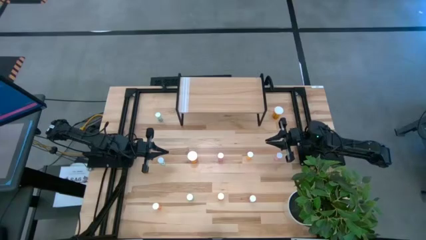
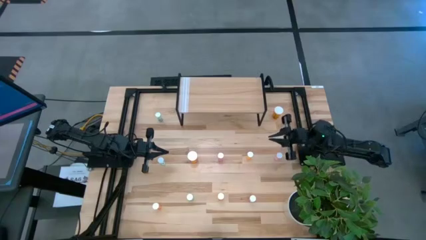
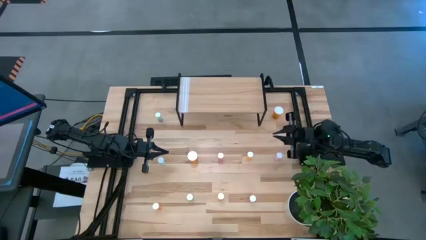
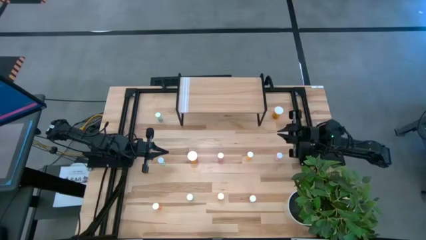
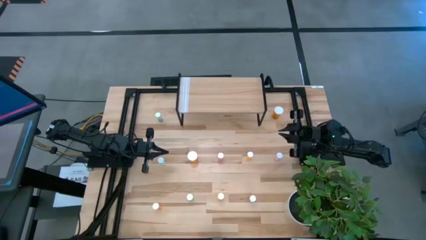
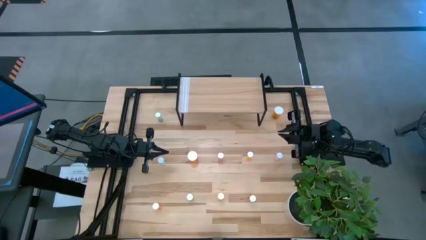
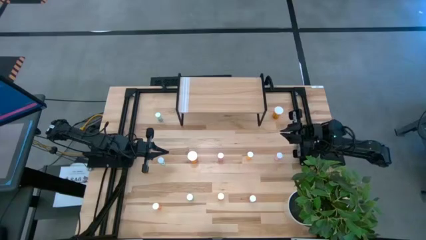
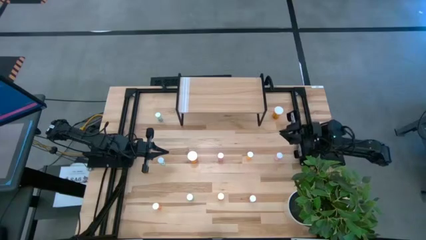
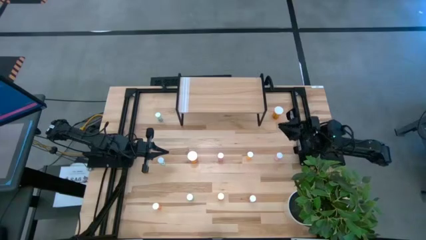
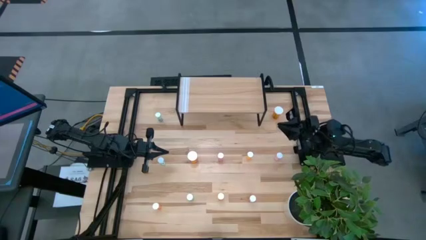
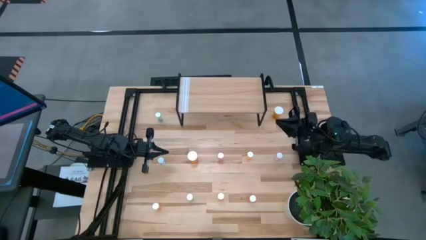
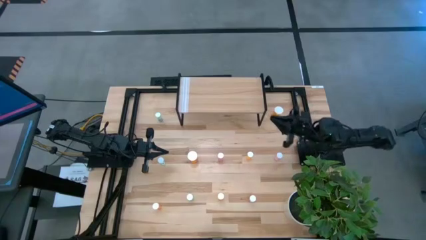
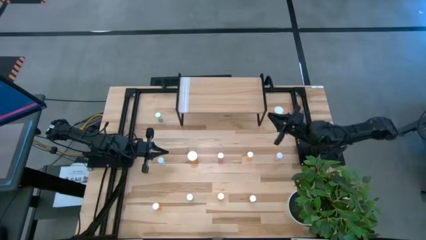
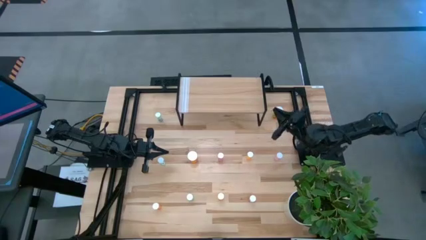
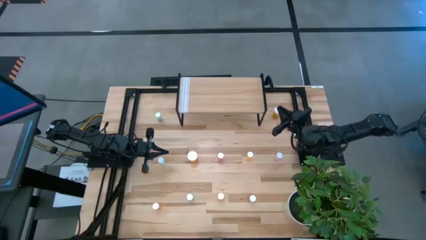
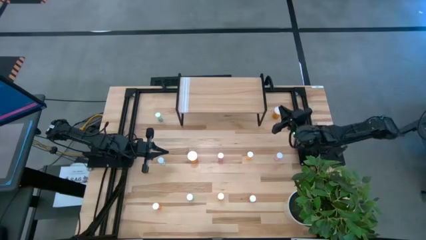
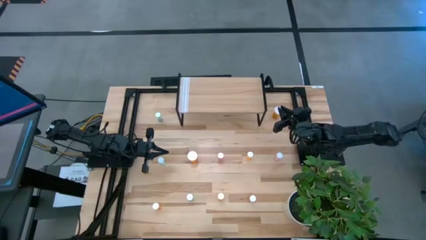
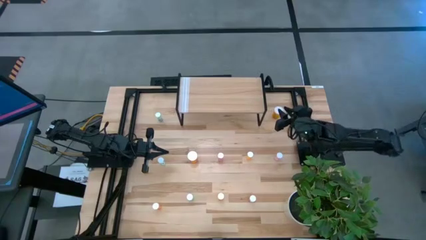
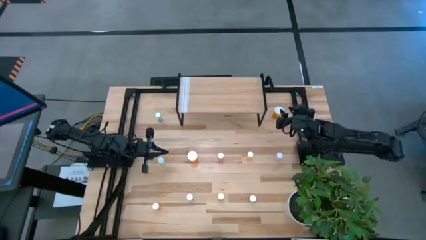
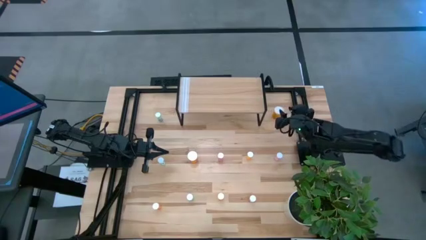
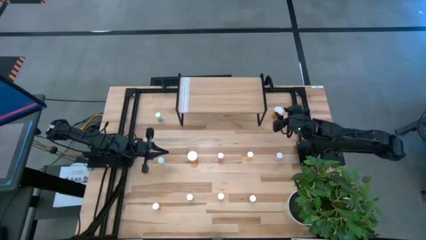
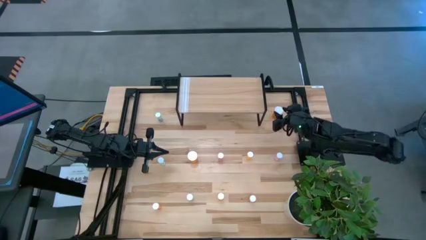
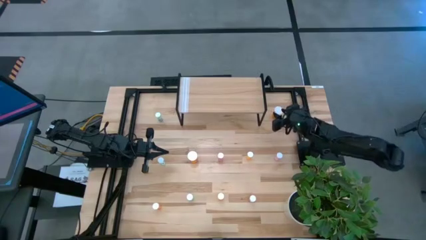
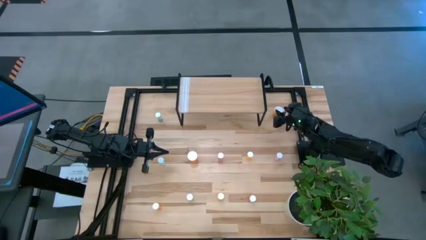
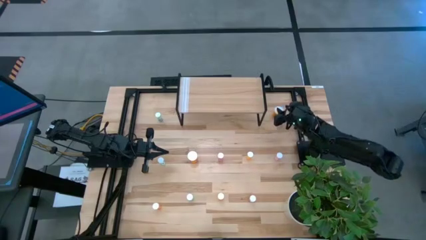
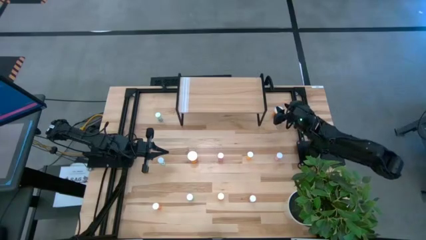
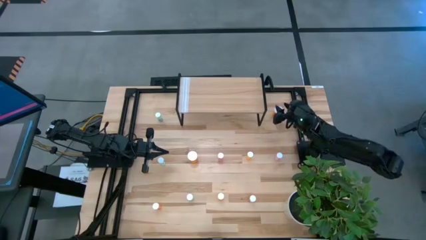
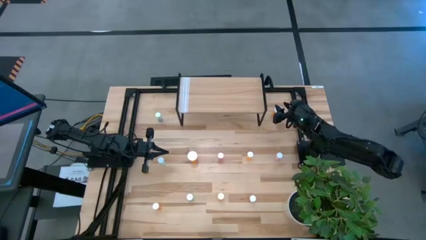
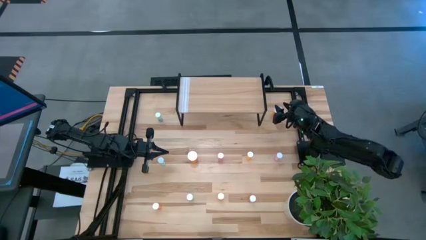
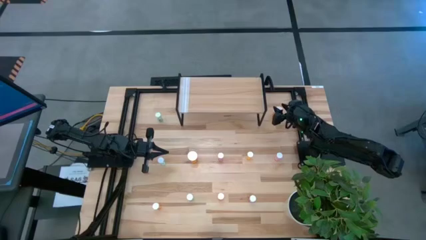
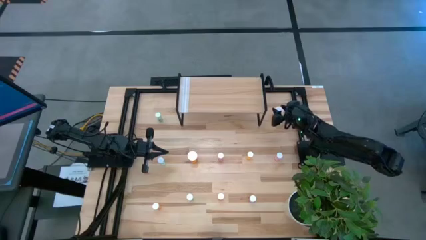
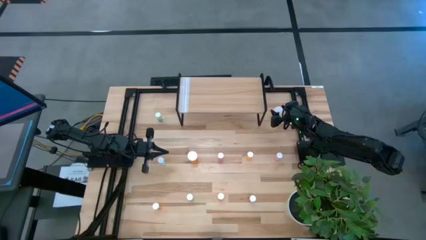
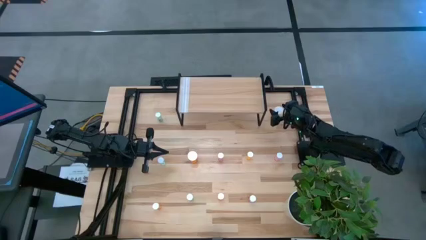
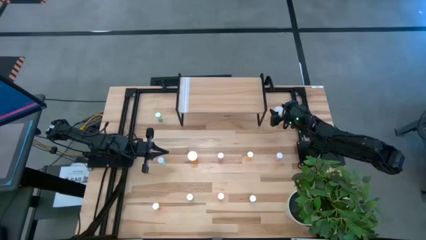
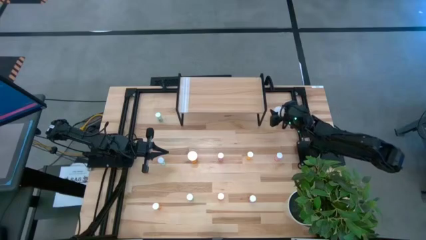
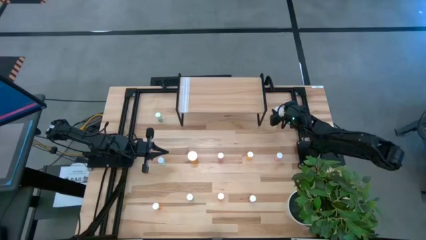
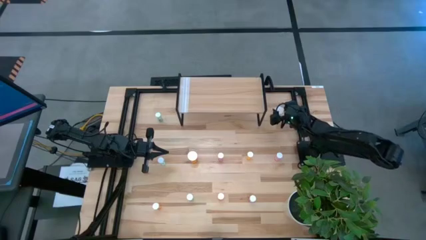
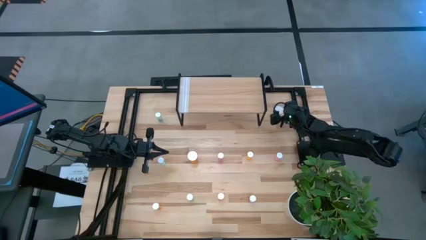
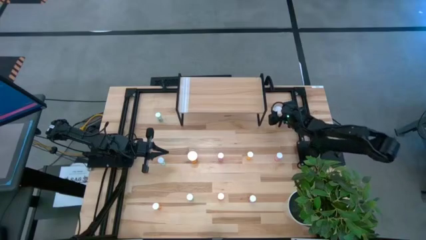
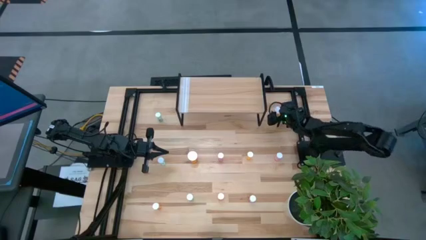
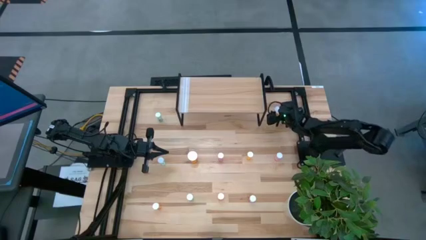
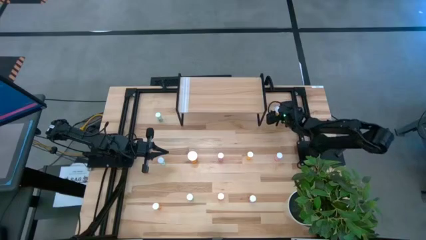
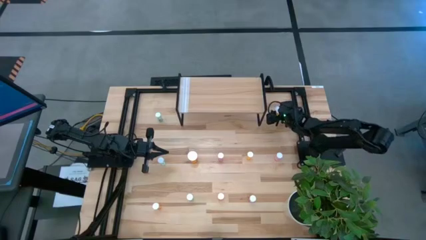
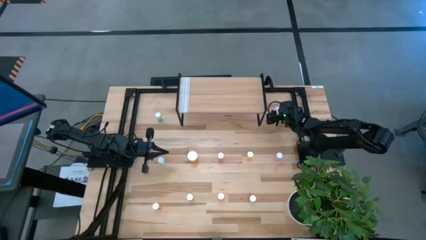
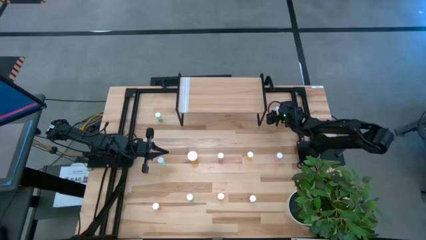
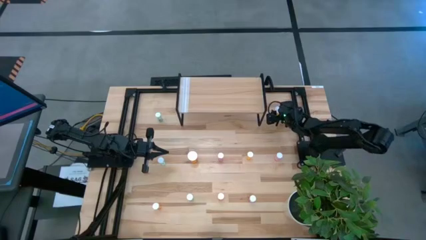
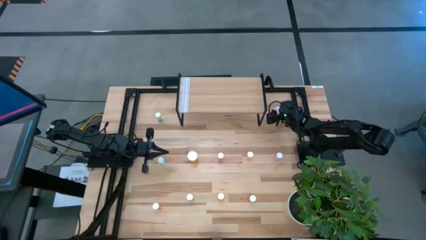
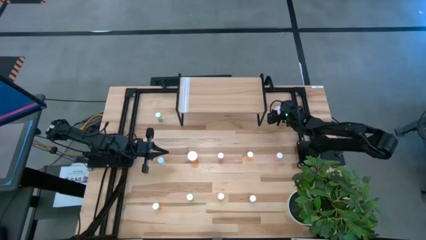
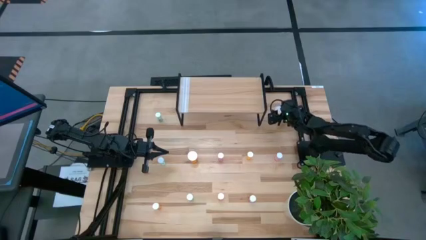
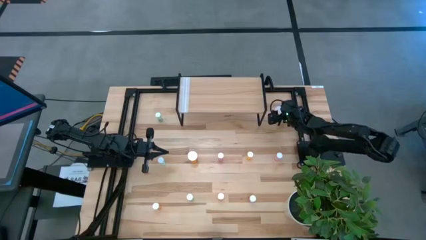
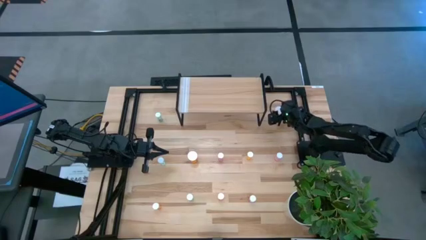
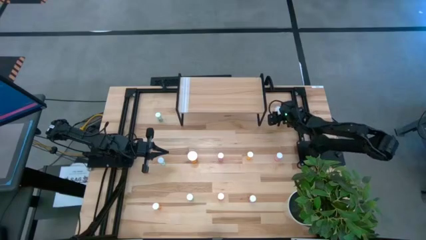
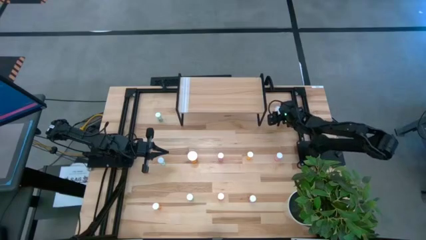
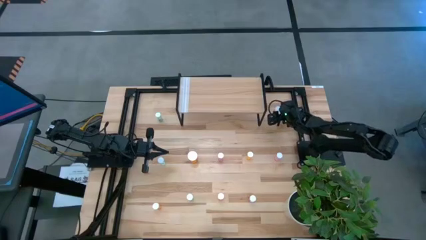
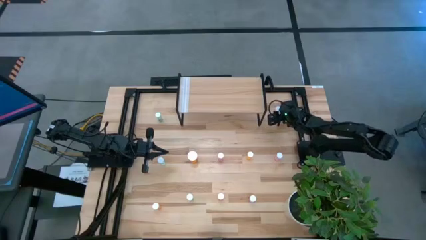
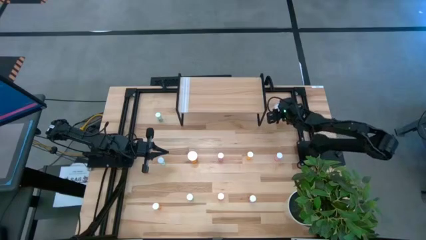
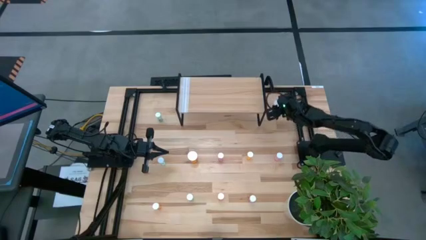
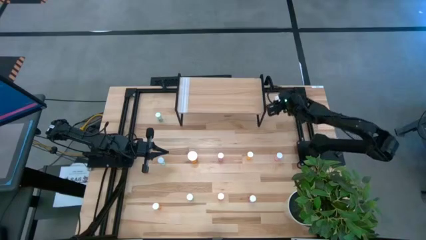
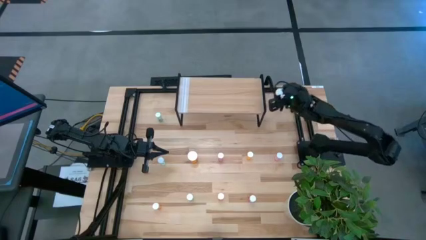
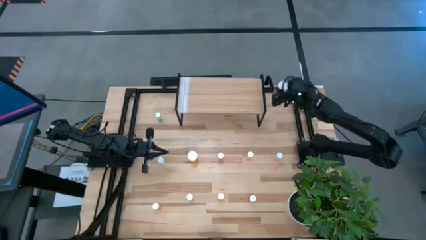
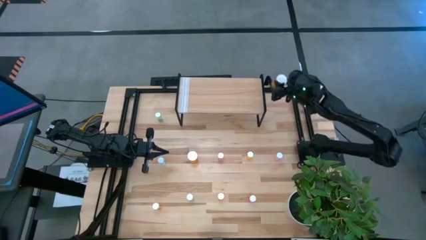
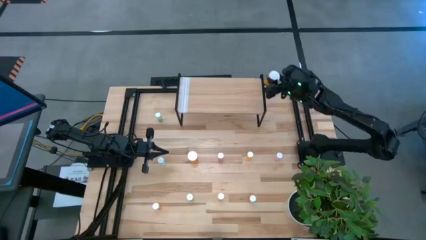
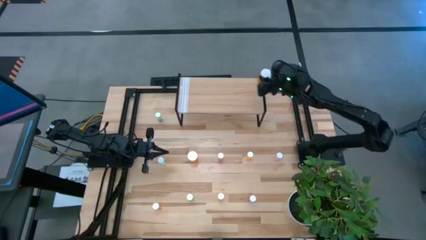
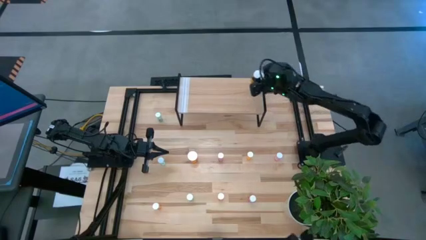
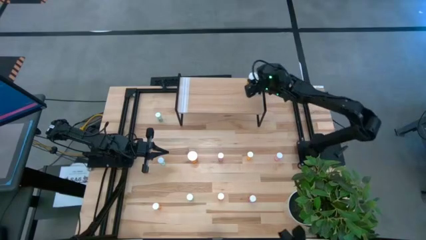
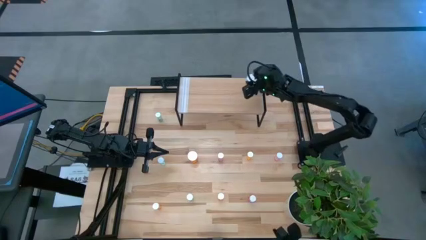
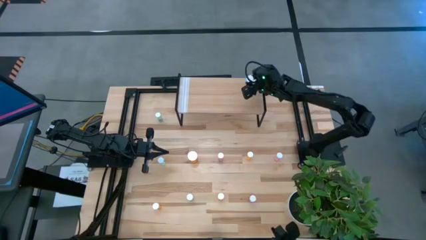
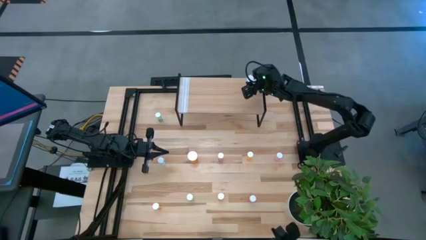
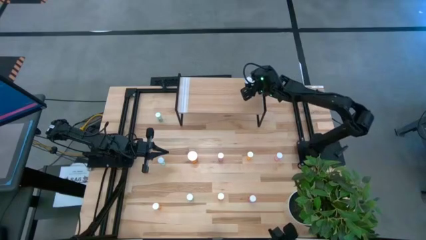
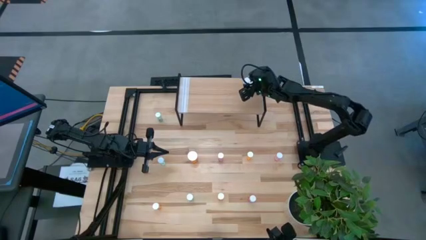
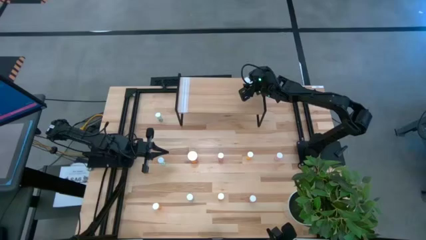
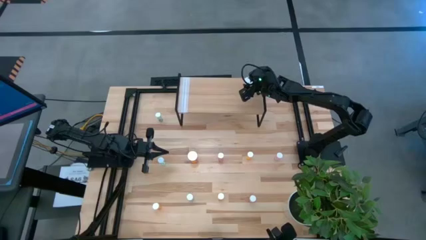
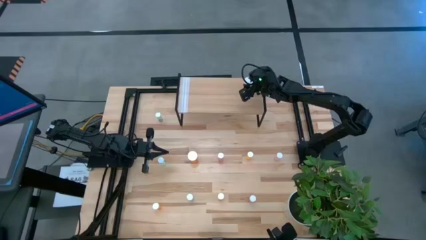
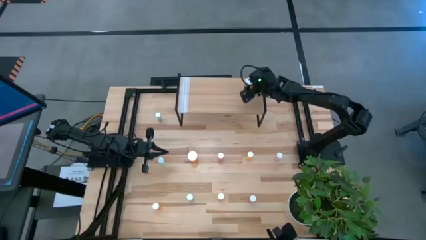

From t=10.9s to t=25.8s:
Task: Pick and place medicine bottles onto shelf by color
Put the top big orange pill bottle on the shelf
